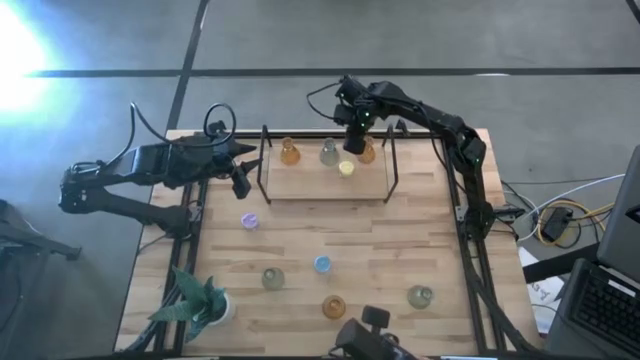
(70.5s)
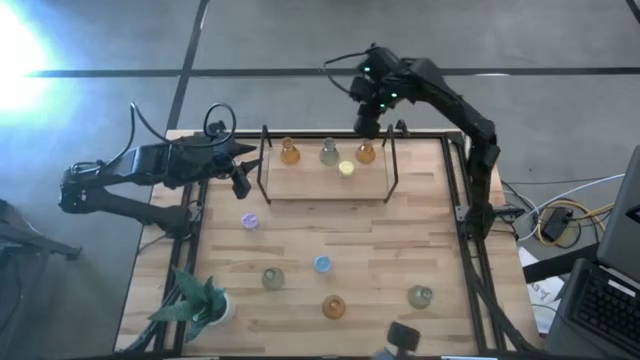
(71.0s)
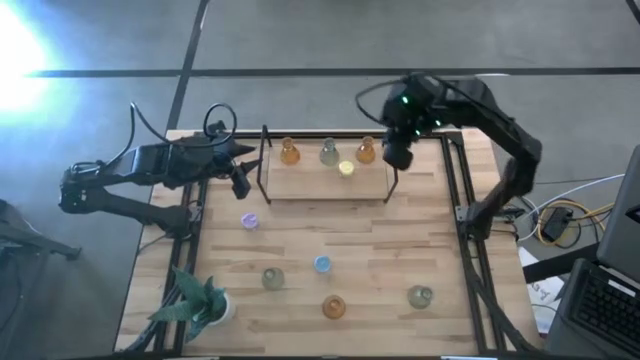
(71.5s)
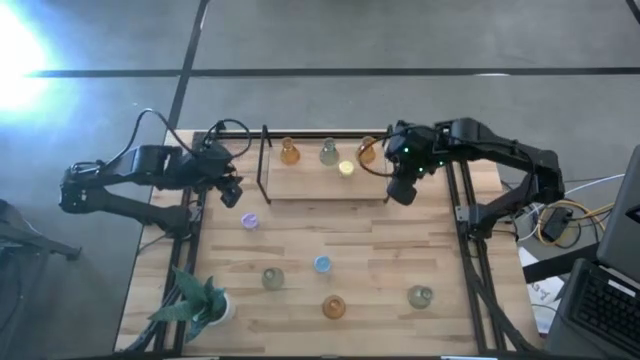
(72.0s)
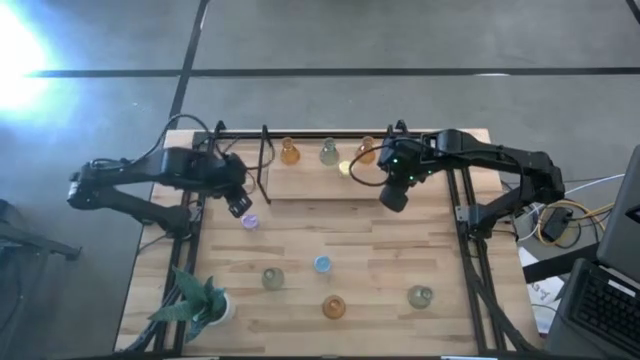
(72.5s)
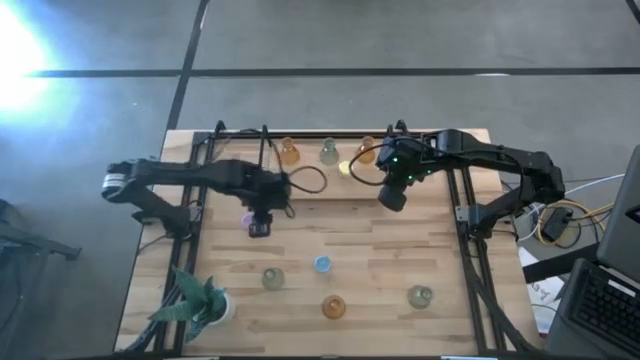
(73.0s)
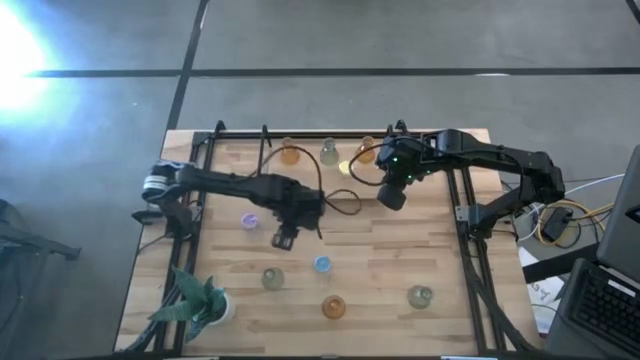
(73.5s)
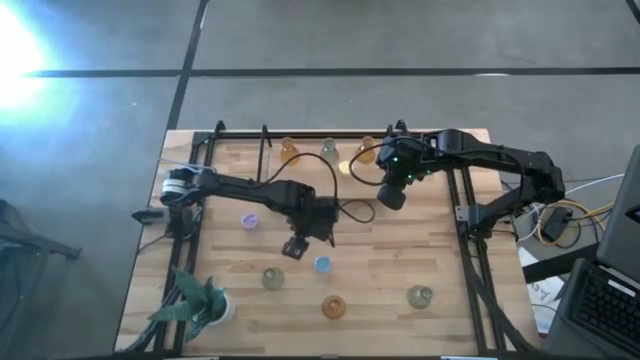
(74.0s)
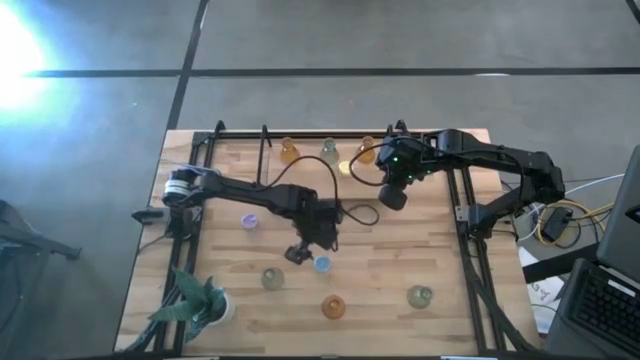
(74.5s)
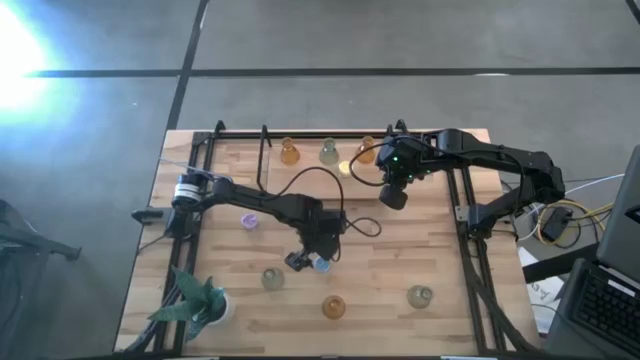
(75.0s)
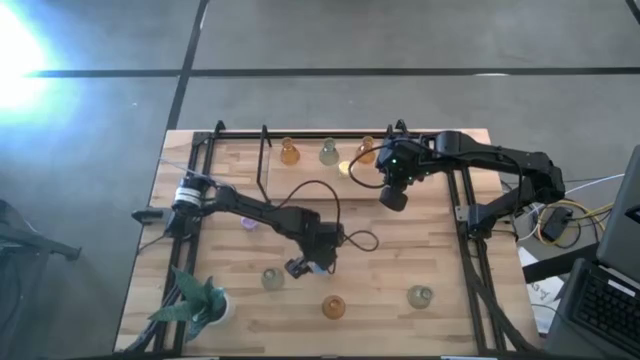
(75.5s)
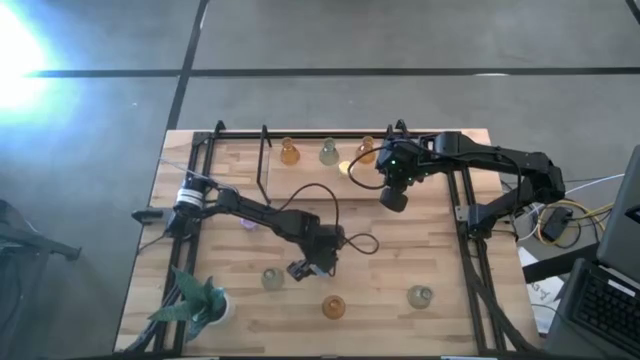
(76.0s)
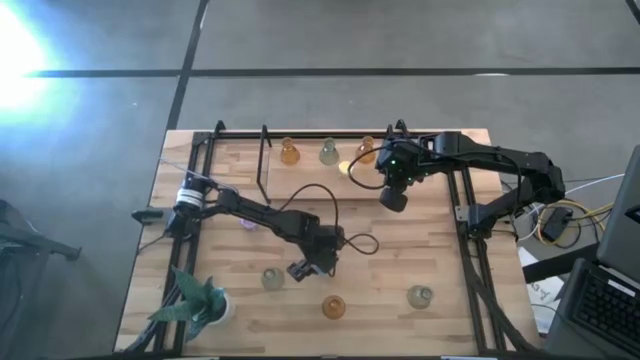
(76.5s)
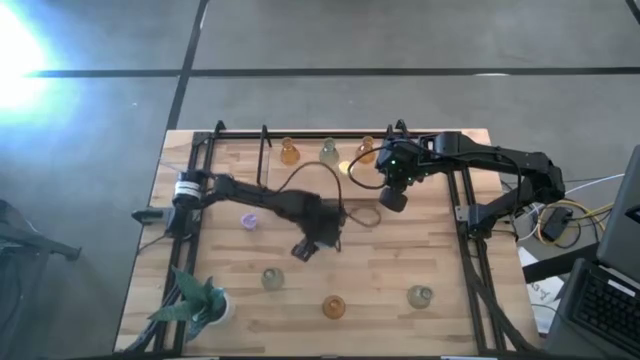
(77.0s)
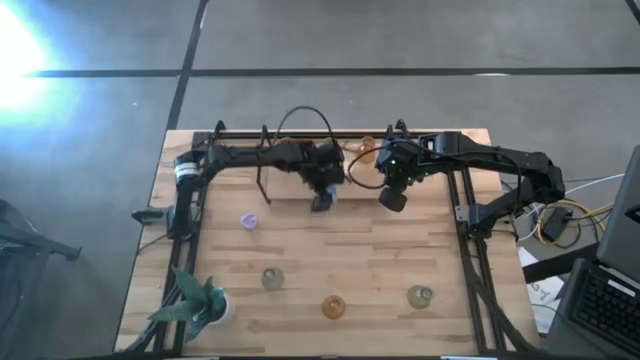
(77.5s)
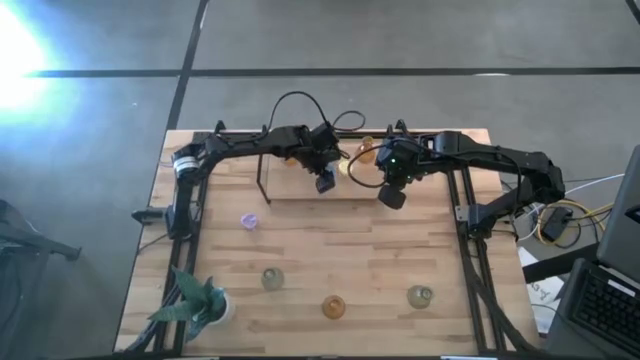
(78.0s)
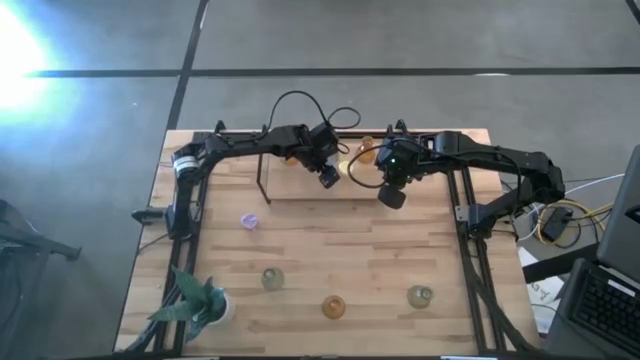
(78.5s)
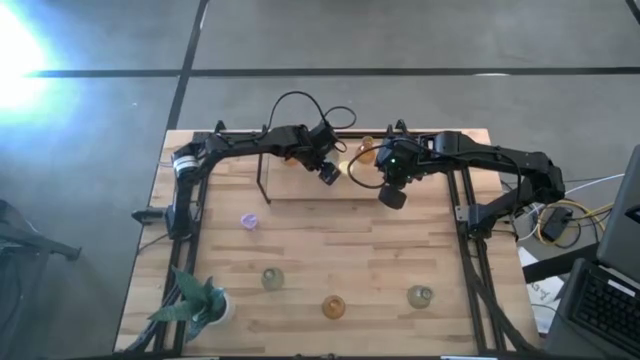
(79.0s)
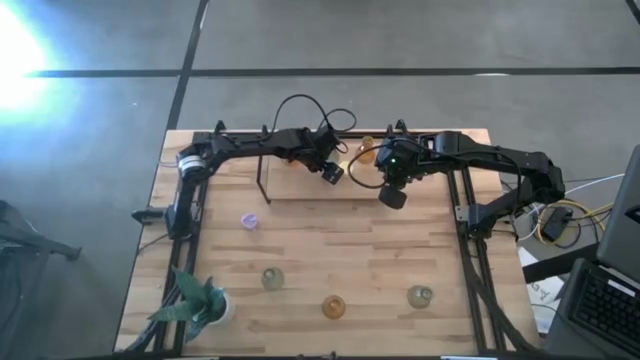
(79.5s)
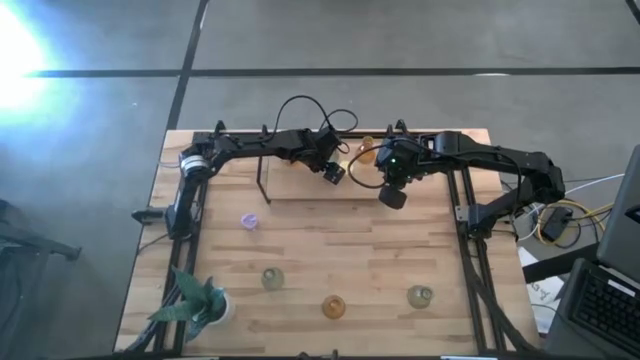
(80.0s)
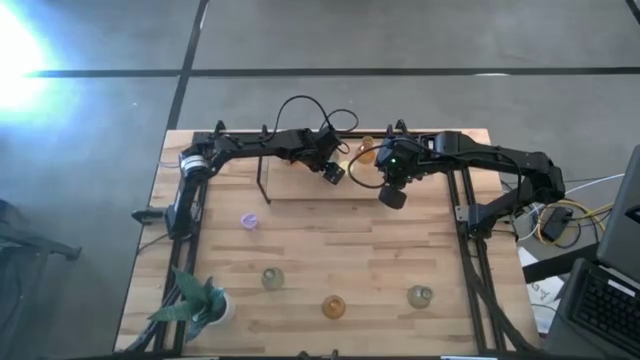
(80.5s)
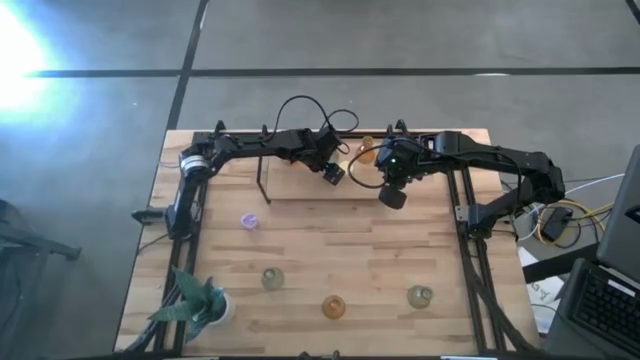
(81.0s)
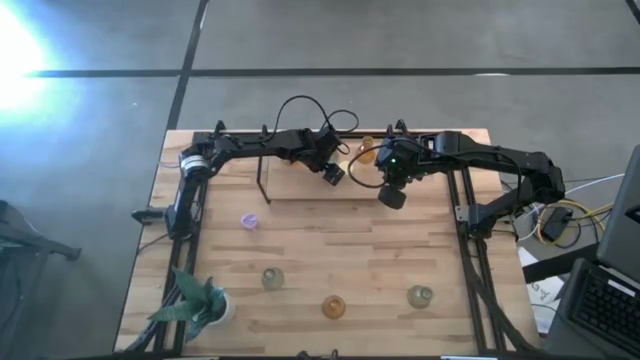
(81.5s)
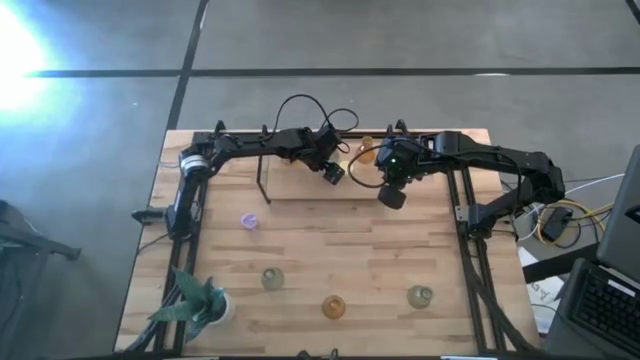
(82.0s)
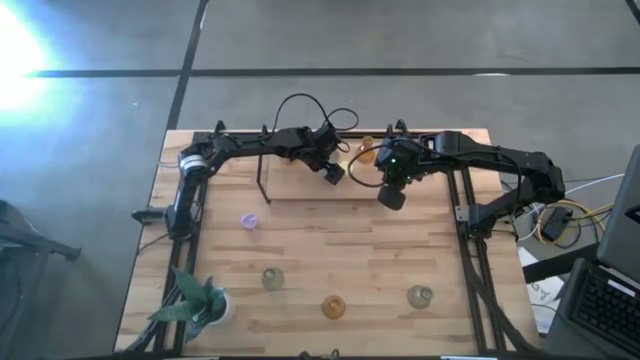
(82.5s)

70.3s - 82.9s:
Task: Pick & Place candle stick holders
Put the blue candle on the shelf
